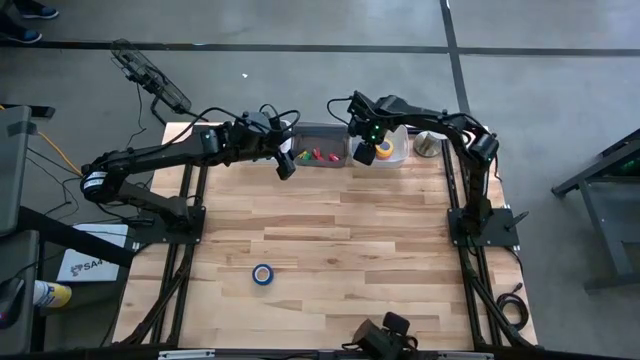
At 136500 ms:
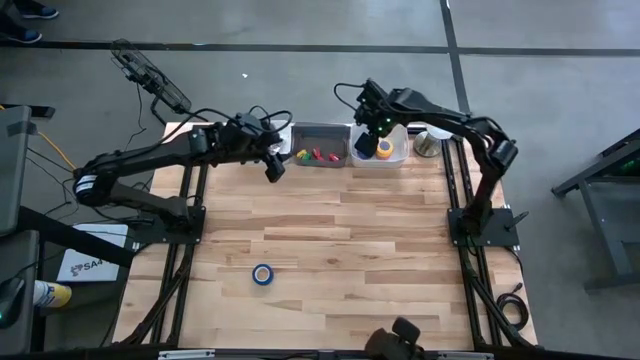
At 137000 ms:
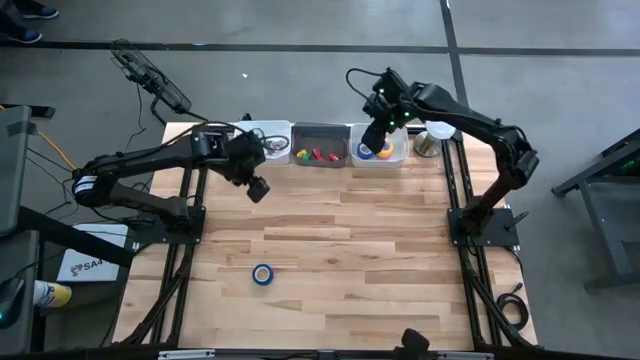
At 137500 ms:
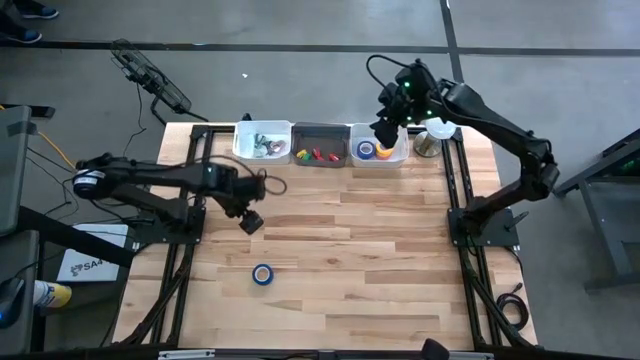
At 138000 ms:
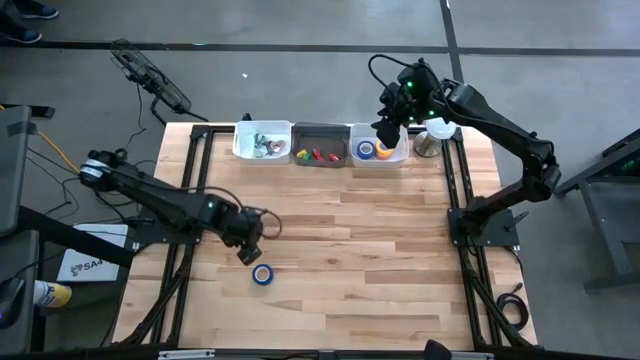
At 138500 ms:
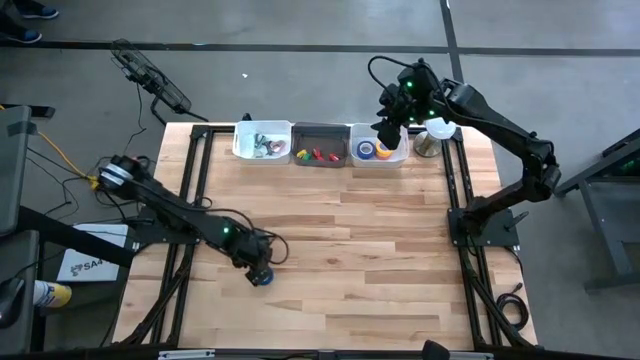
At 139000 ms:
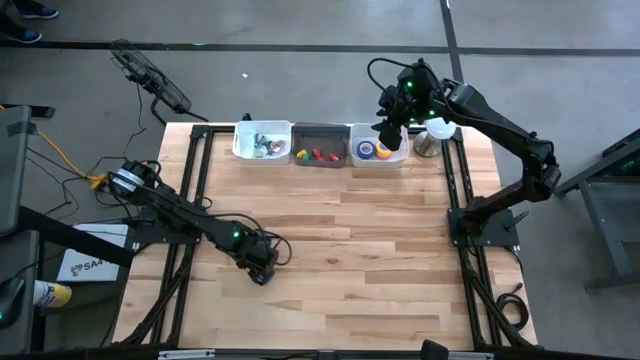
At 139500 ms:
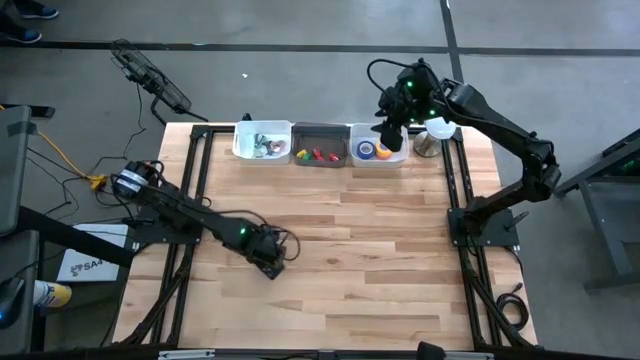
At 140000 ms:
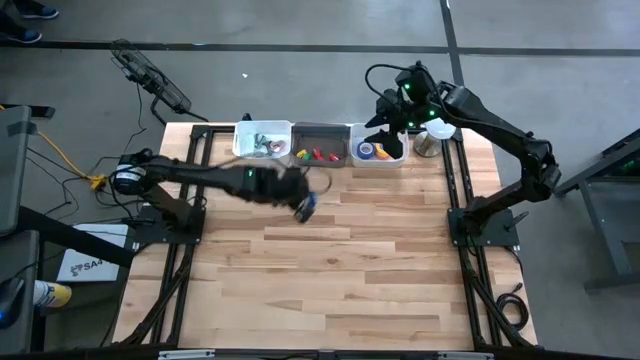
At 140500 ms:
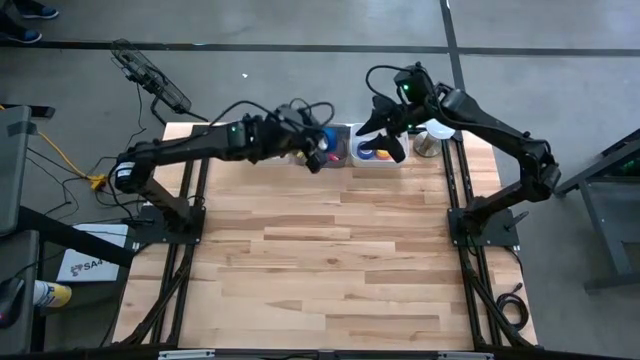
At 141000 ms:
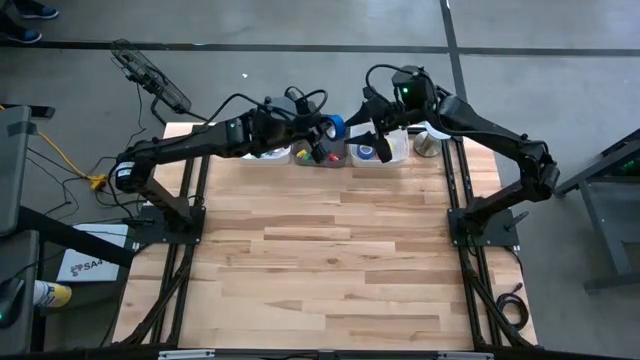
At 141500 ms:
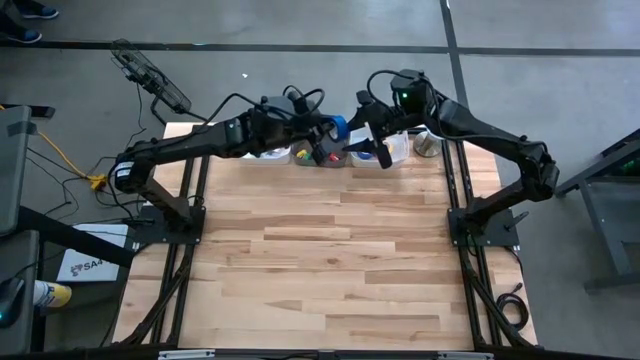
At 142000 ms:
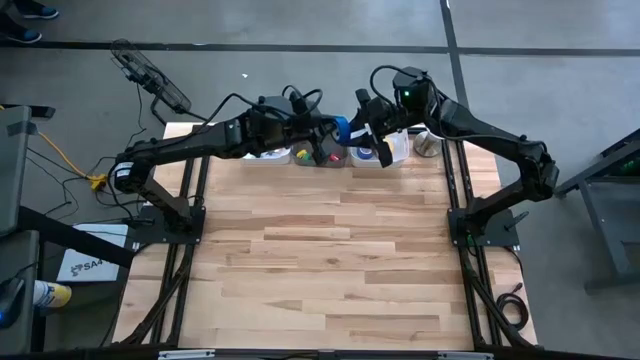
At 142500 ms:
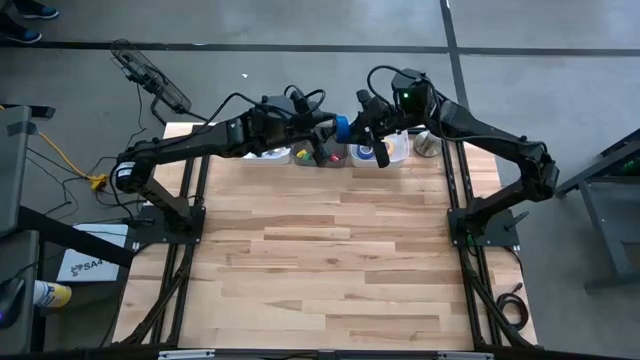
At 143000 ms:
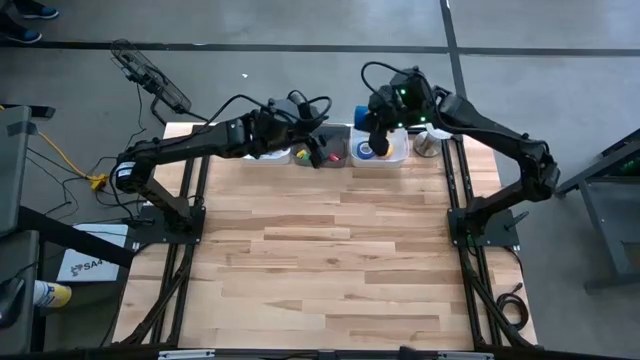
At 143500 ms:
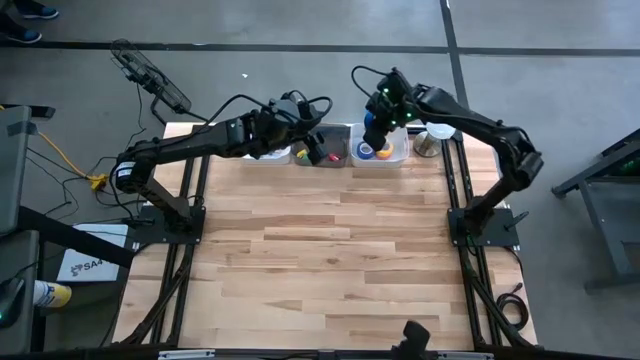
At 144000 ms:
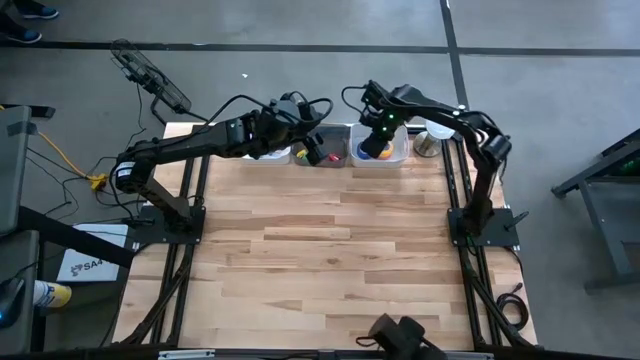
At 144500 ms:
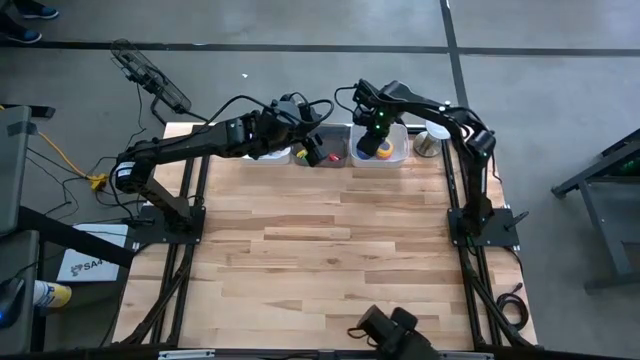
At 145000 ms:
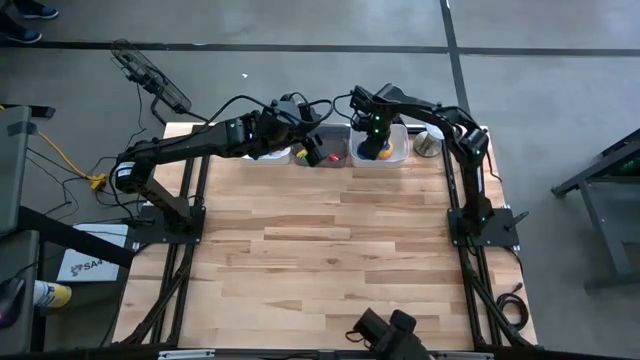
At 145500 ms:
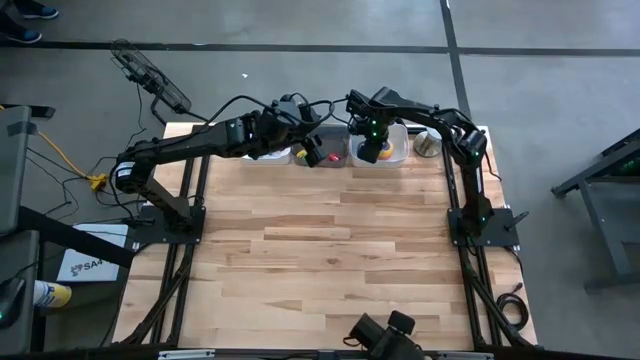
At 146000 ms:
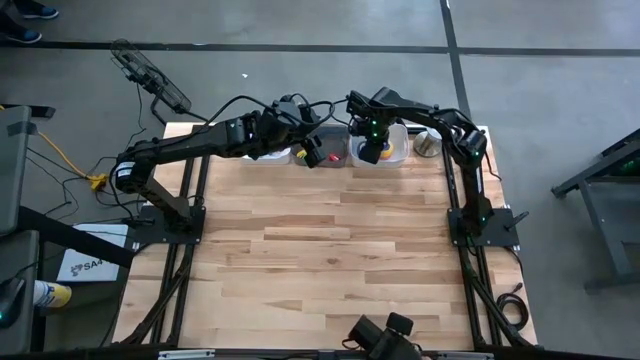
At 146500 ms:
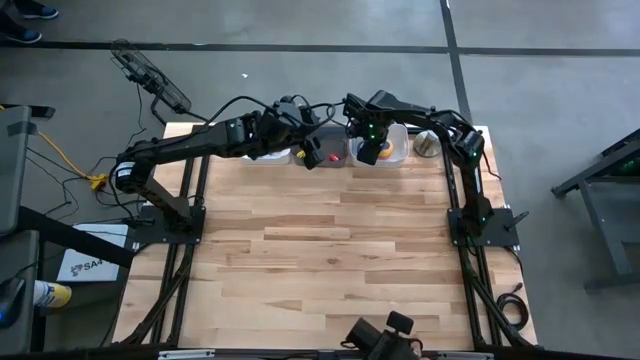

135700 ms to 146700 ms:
Task: Pick and place Stapler, Stapler remover, tape
Put the blue tape into the right white bin

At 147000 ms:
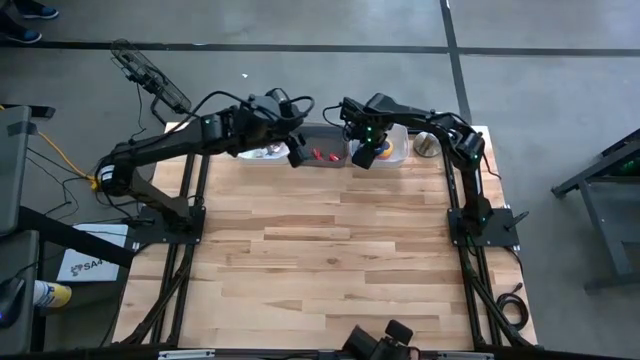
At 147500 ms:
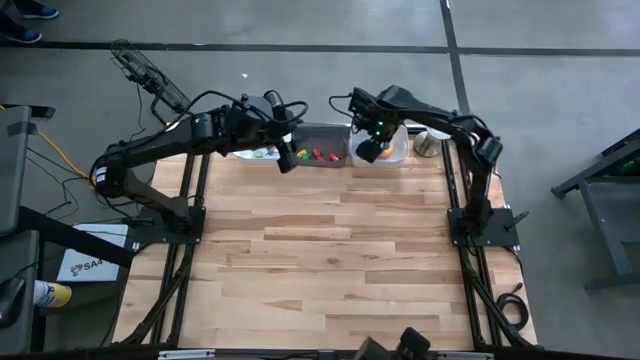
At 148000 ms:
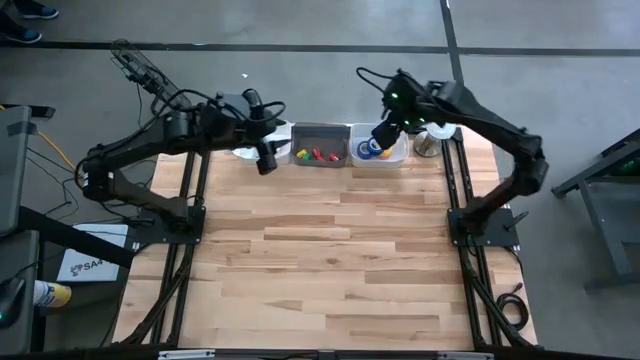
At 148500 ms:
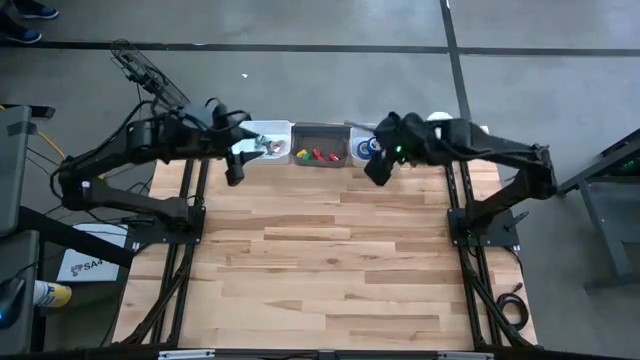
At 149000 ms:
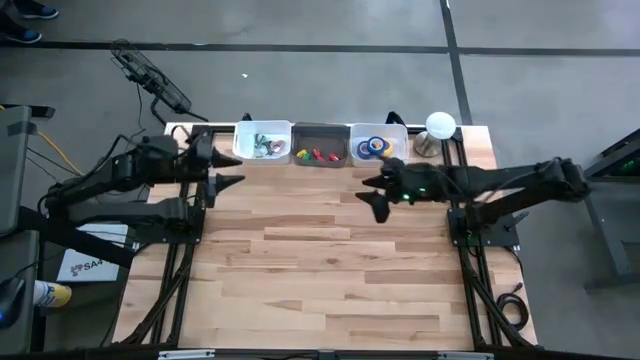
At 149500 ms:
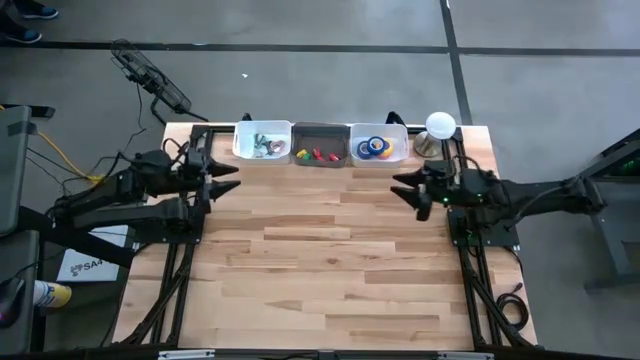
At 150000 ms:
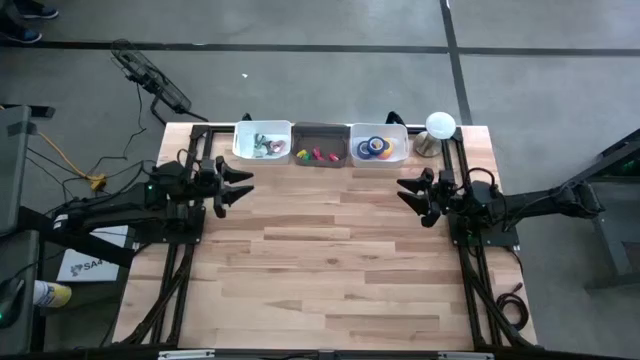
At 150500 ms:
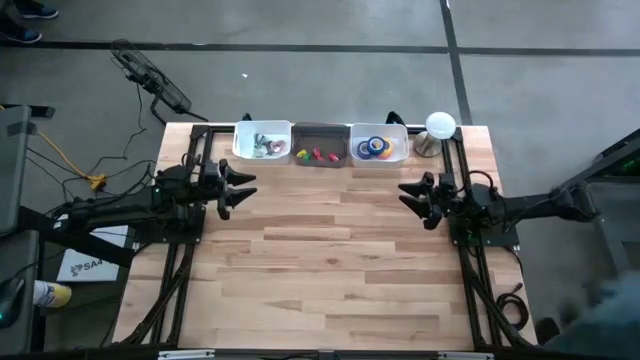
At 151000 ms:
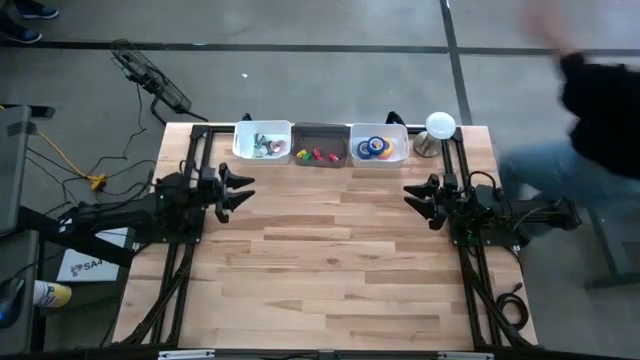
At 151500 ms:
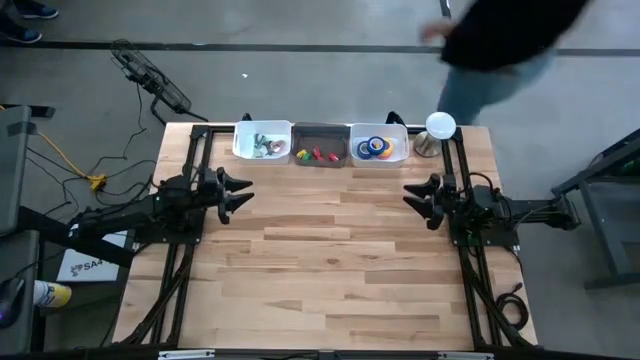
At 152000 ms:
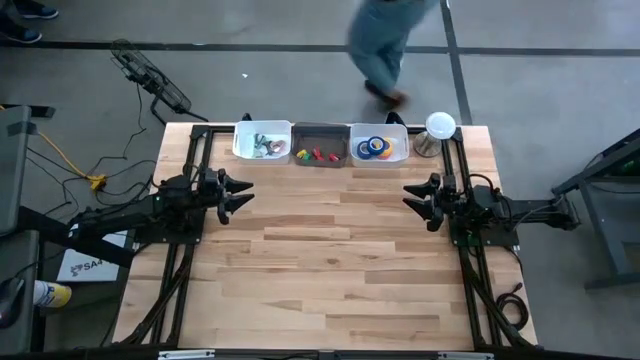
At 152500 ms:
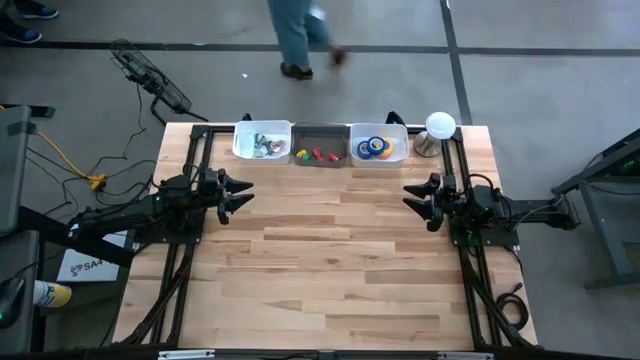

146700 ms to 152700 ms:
Return to Home Position

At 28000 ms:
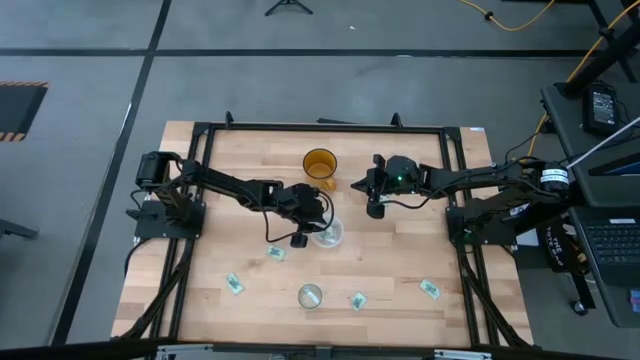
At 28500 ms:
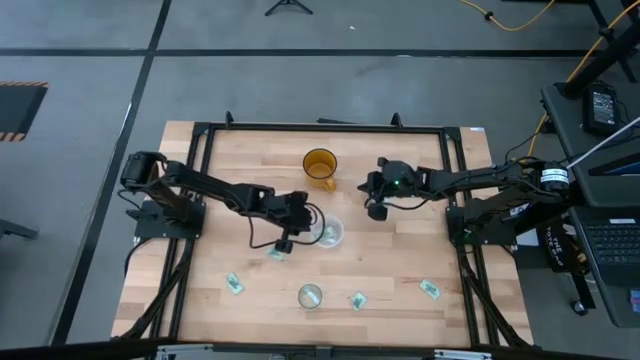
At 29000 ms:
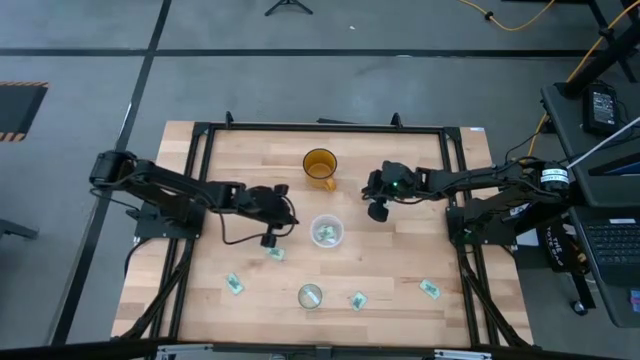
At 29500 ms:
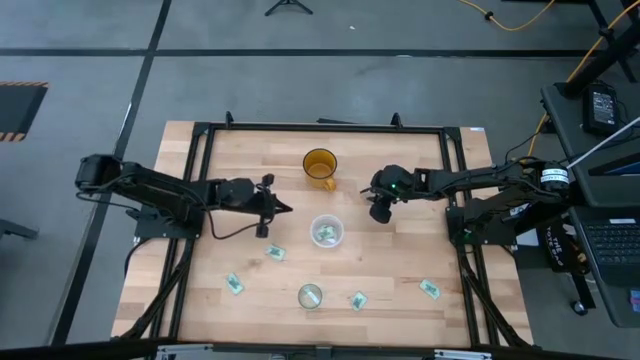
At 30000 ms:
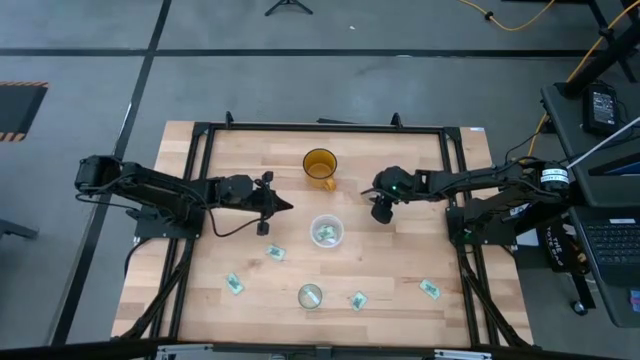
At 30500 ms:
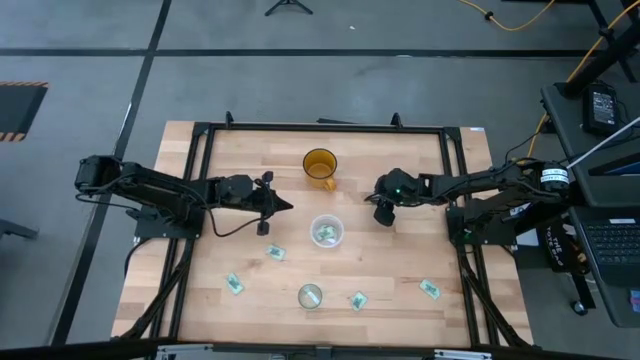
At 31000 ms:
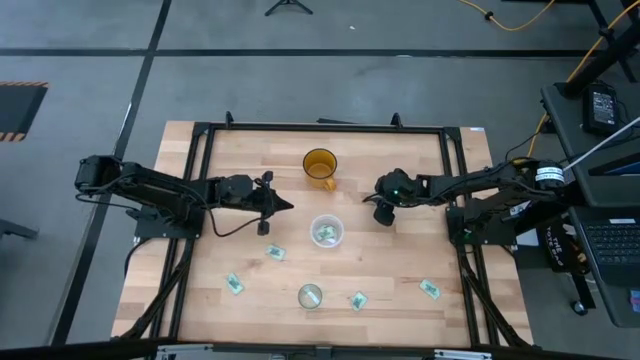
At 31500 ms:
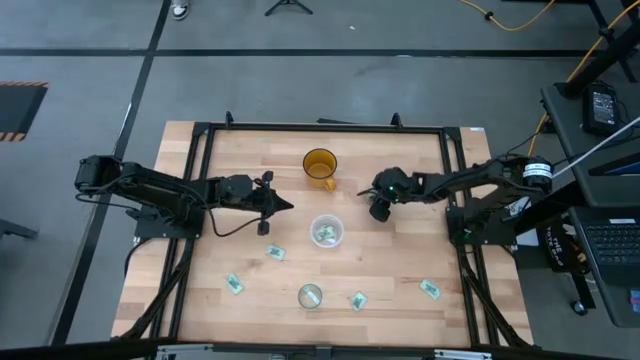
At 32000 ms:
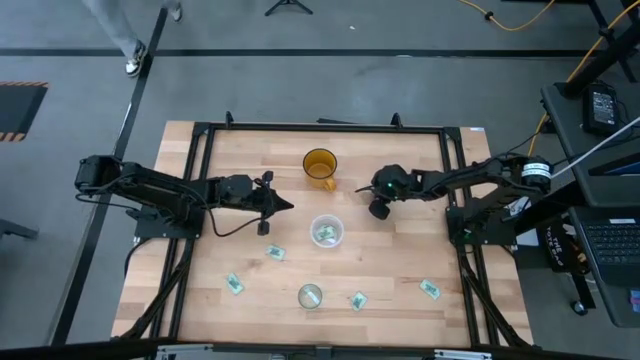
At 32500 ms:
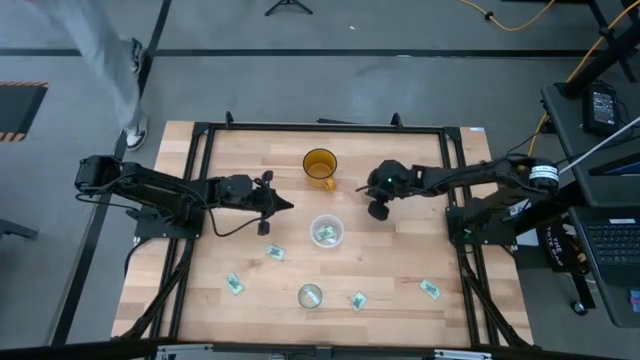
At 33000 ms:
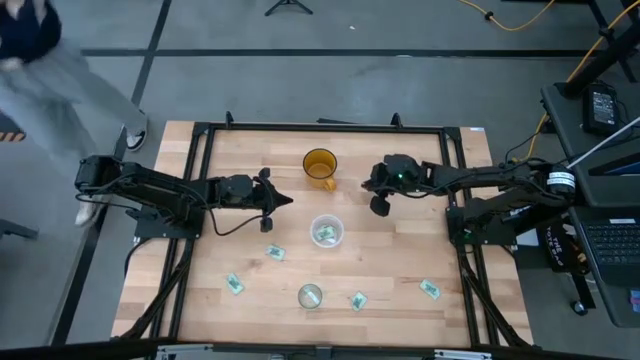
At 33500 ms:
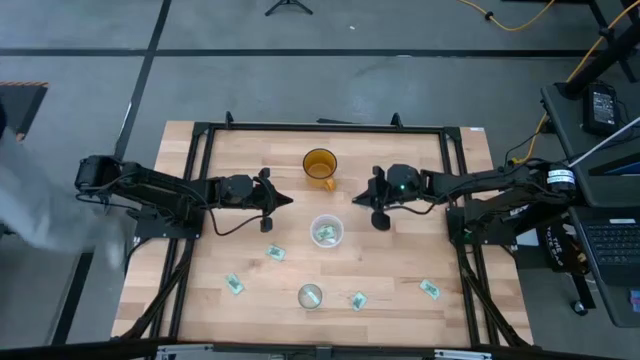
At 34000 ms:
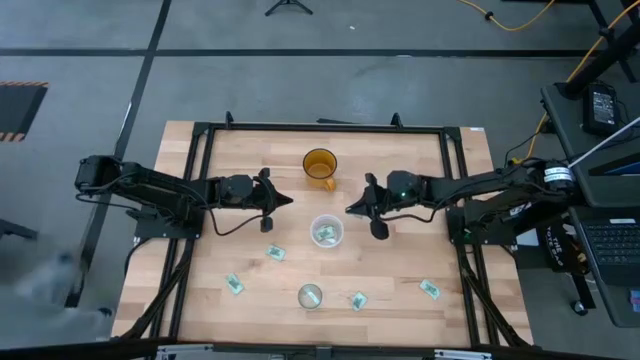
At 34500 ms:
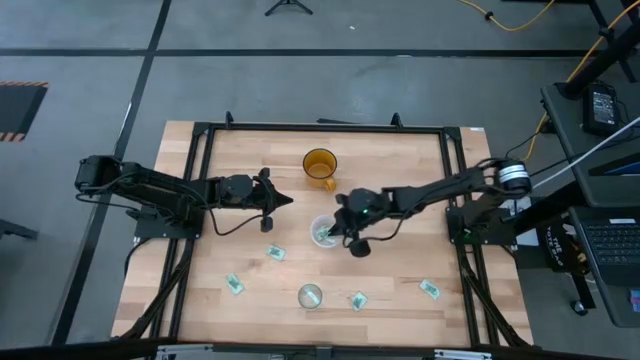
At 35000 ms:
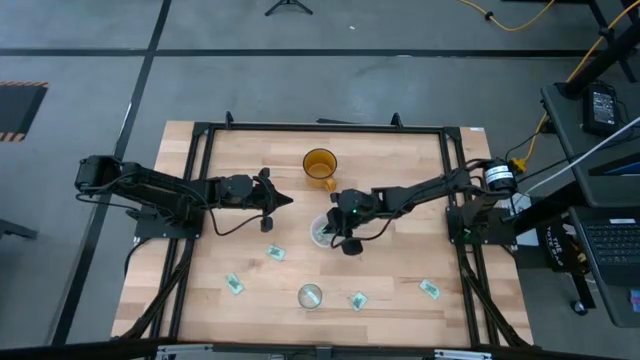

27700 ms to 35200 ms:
Task: Pick and place Stevia / Truvia into bins
Put the stevia packet into the transparent plastic container
